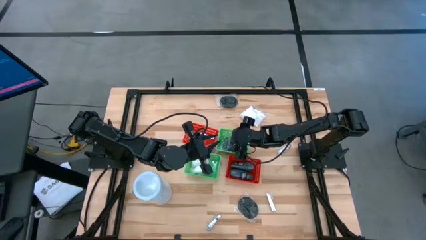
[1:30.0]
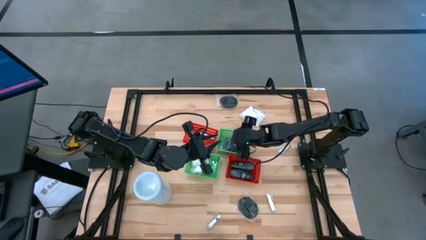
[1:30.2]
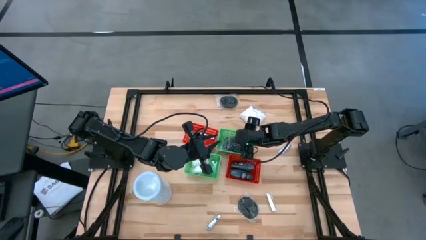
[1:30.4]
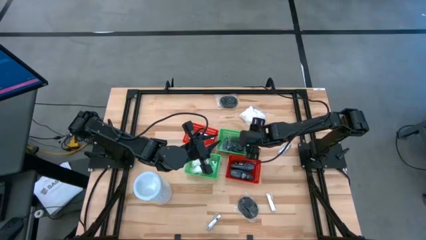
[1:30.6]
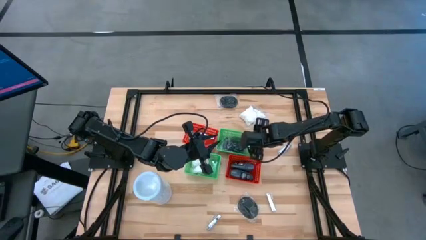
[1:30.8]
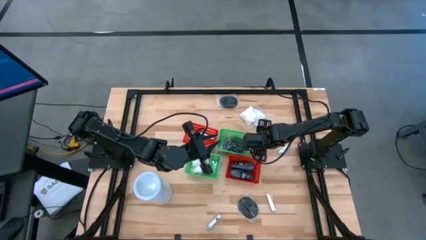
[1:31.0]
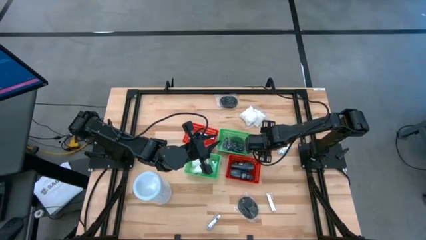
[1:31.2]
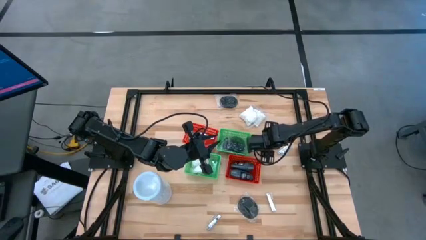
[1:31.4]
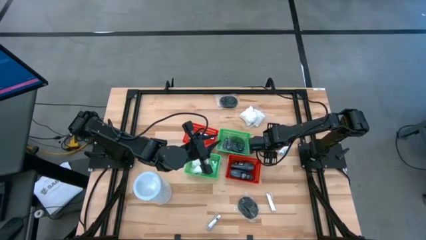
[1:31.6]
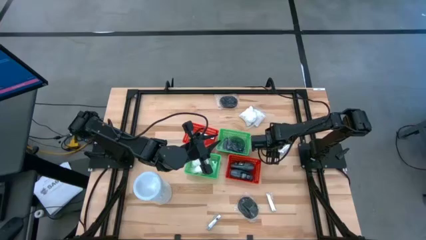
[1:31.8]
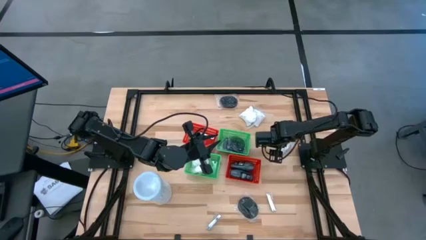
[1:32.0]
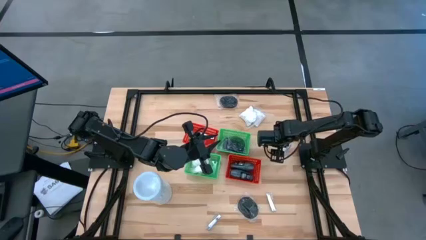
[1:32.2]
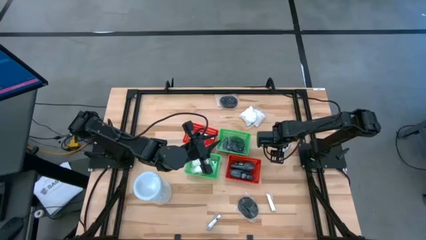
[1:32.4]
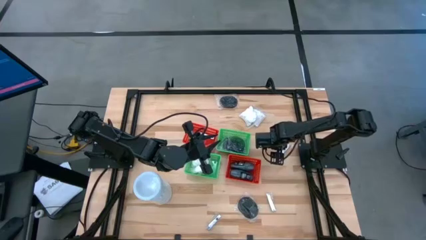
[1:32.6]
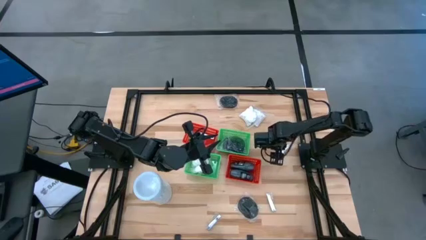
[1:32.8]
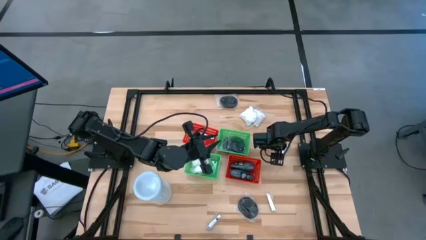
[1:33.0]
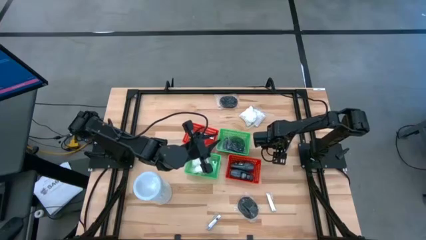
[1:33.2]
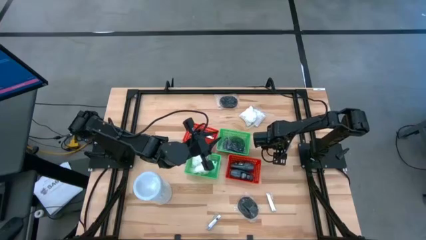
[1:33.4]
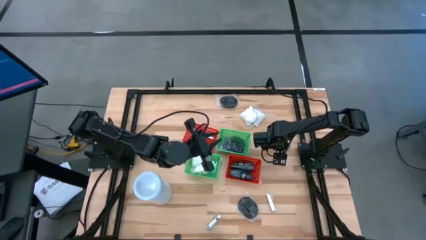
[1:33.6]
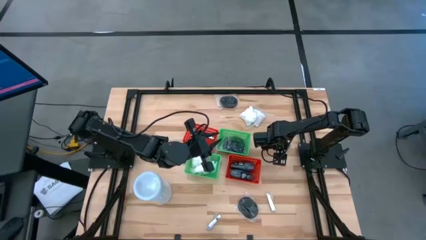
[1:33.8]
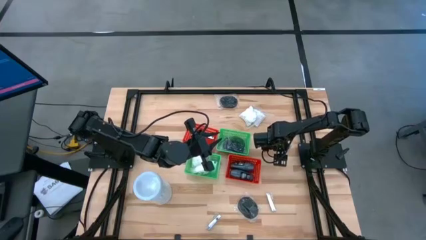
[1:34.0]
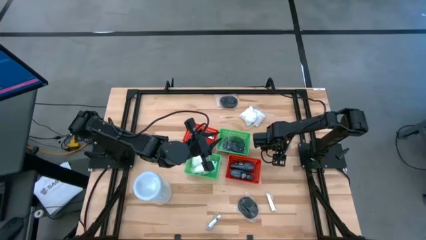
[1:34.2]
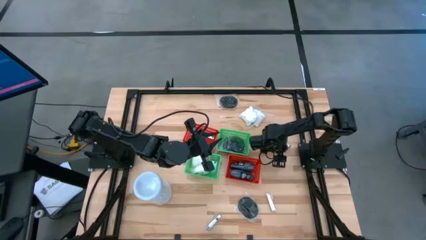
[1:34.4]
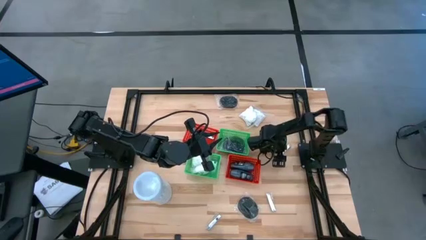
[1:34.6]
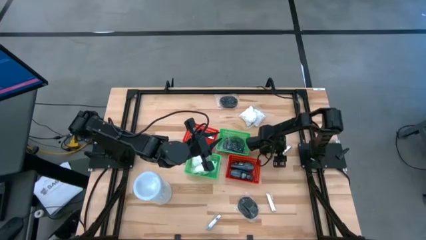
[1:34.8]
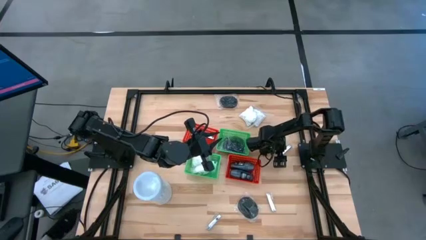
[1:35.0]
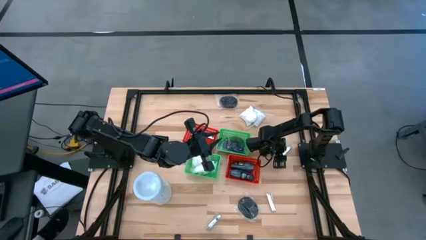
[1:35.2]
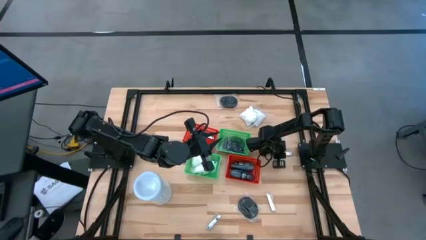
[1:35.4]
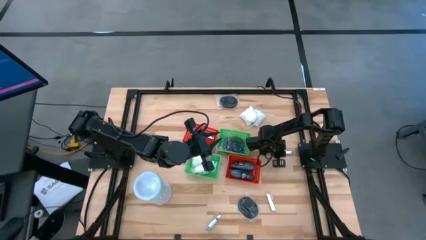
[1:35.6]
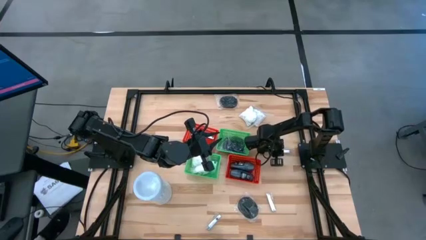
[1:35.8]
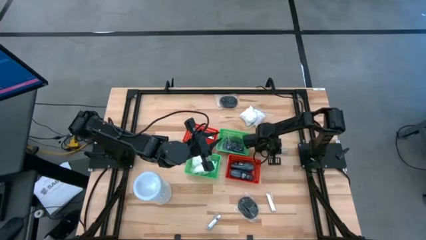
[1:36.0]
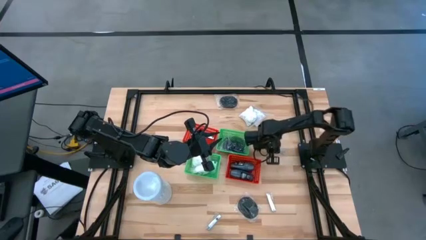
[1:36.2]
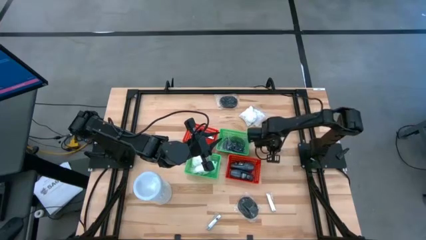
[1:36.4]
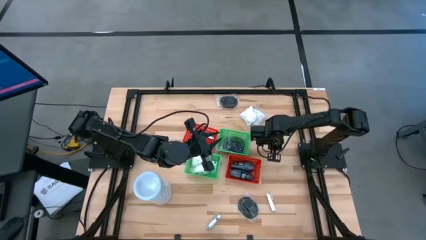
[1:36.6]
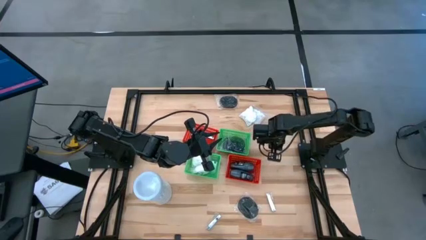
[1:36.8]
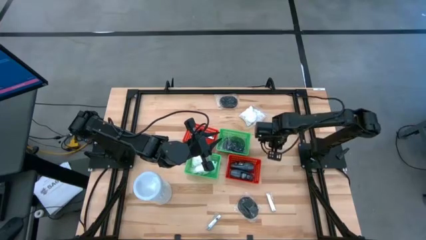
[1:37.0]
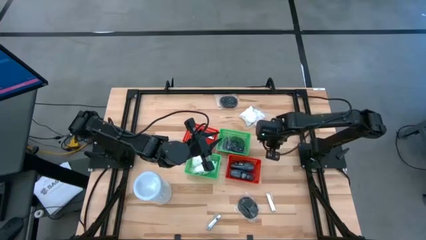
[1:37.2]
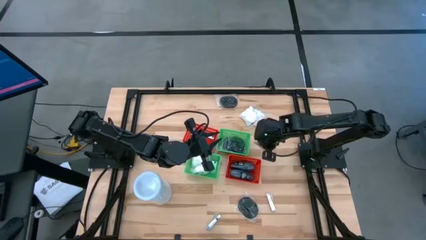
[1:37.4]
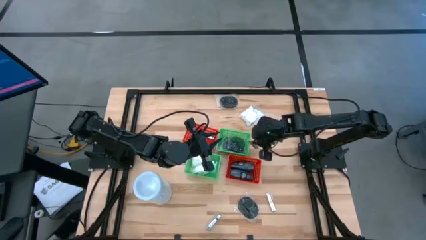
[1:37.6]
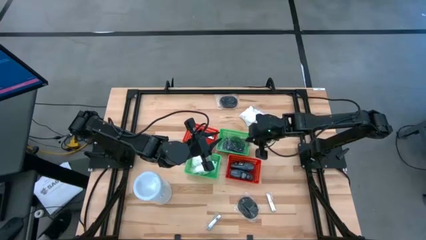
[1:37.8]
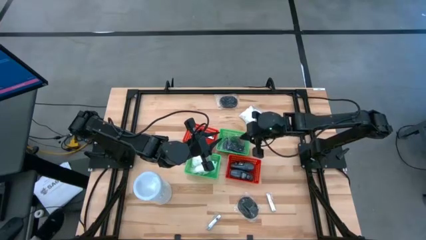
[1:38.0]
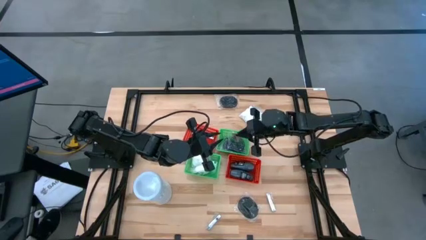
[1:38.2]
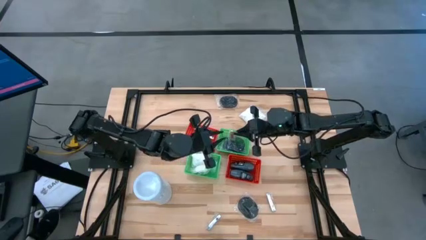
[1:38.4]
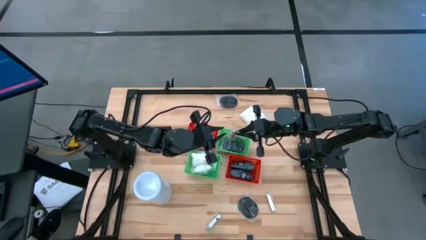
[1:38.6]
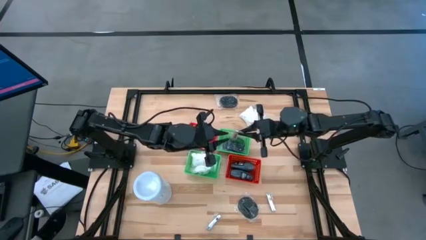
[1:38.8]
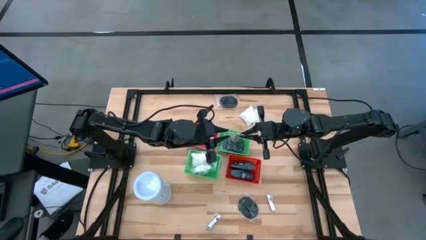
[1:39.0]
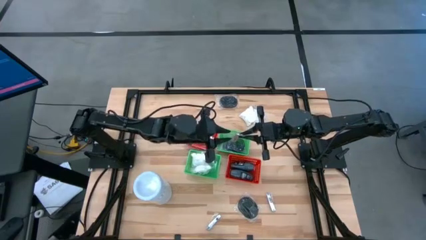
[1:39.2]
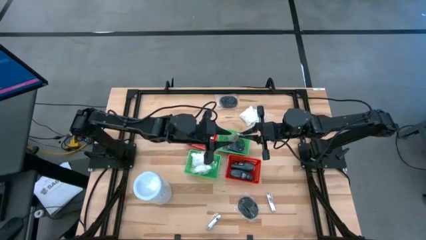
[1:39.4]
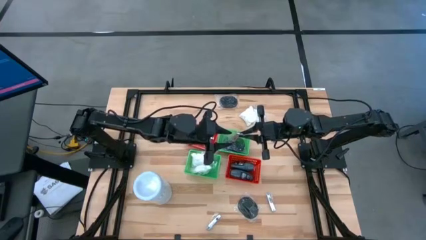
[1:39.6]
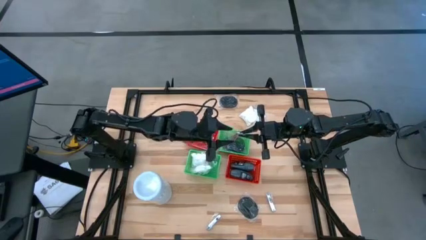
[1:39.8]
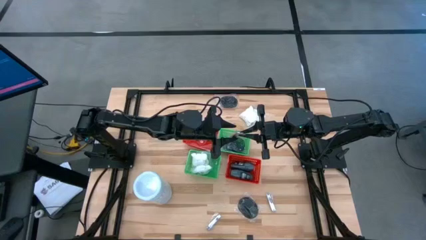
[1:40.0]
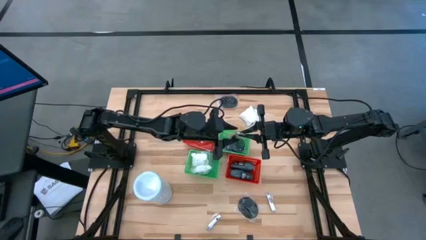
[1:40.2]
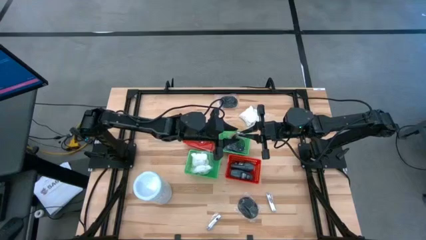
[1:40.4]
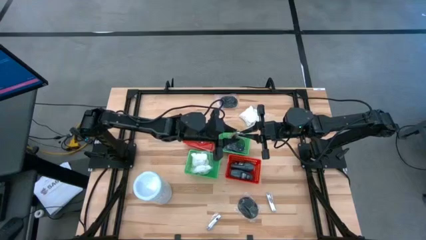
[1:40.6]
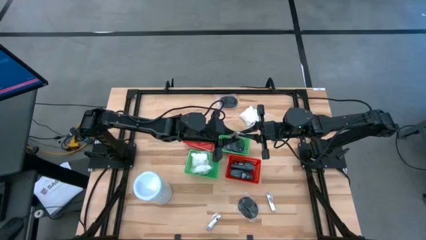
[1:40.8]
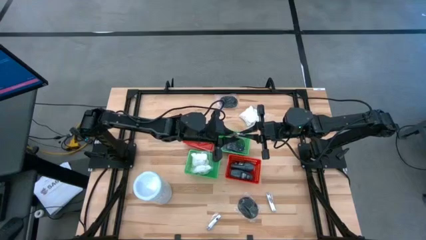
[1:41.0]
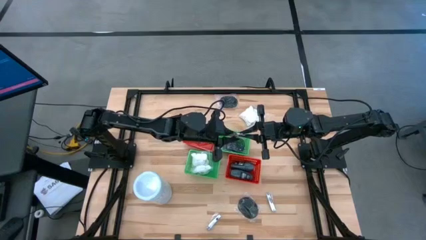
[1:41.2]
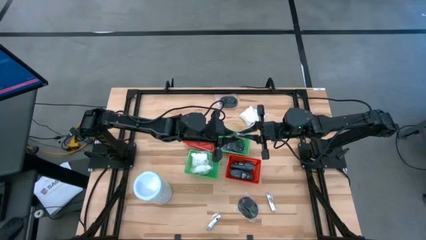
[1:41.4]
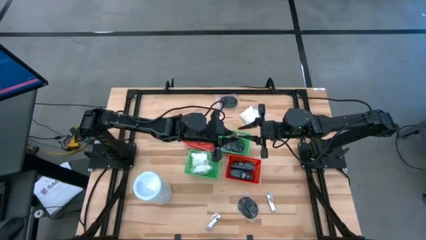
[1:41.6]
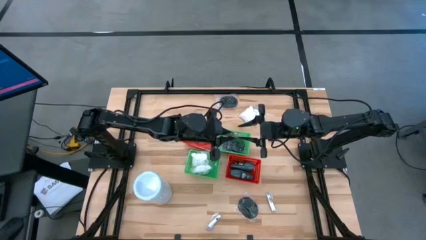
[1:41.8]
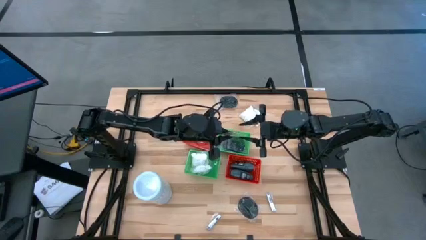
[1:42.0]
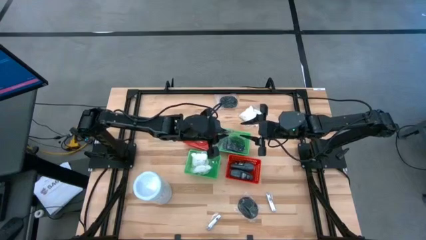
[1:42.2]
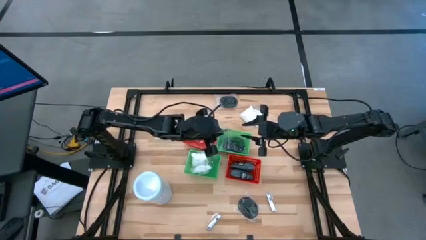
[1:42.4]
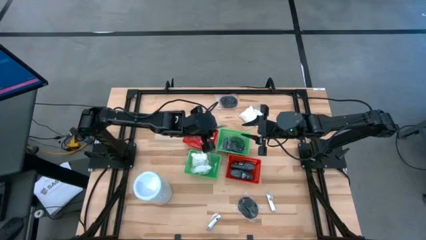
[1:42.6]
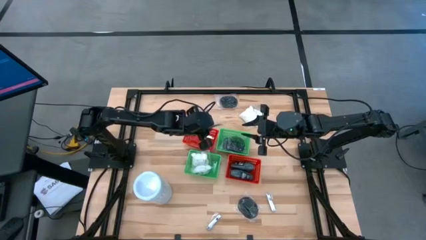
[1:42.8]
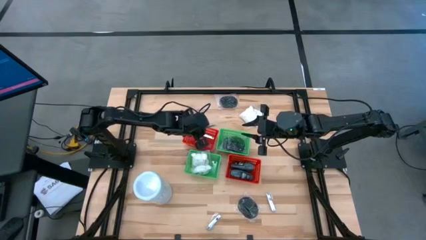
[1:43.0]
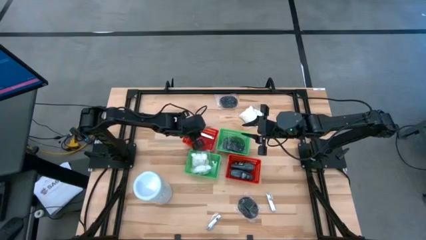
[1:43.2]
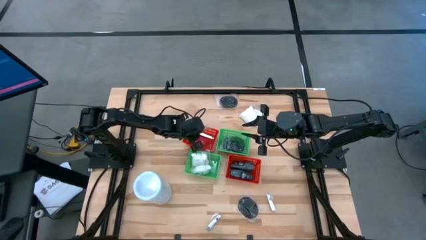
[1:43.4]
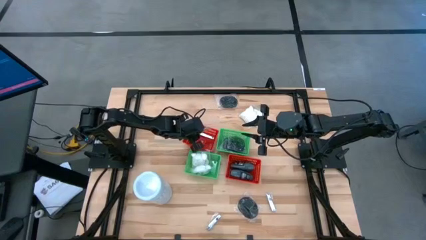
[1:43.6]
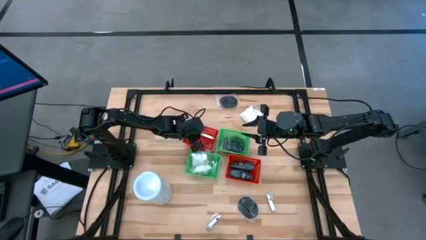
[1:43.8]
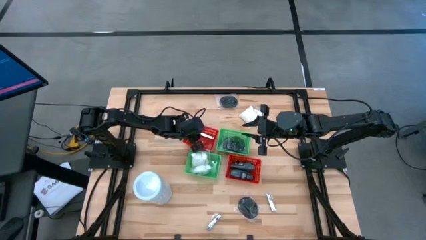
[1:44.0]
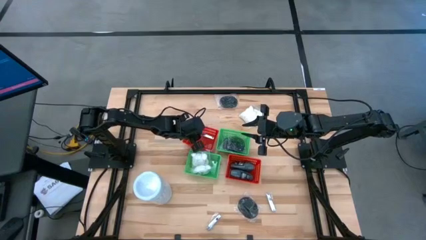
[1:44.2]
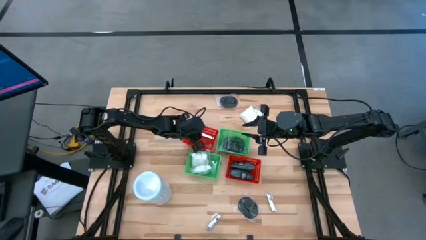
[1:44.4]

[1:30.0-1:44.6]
Task: Pick & Place Travel size toiletries
Put the silver nail cutter into the top left red bin

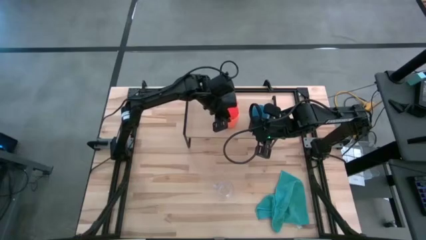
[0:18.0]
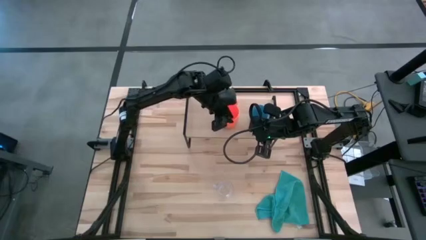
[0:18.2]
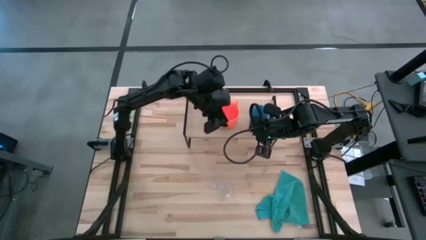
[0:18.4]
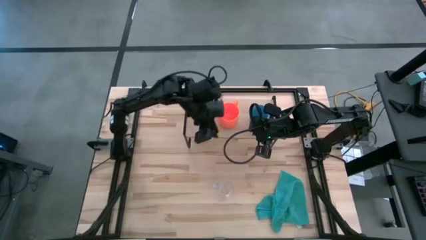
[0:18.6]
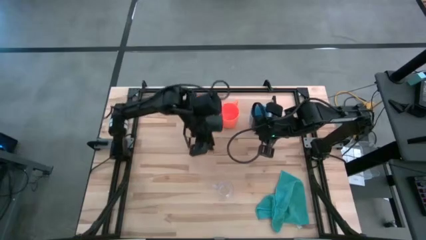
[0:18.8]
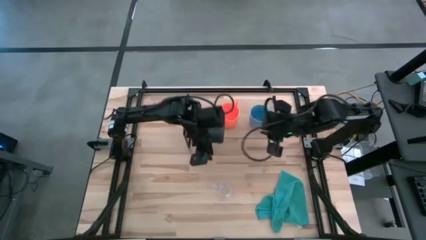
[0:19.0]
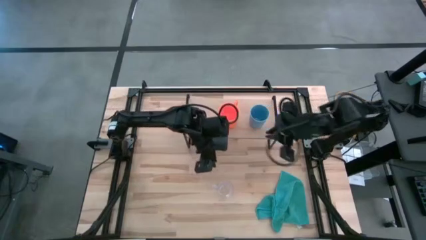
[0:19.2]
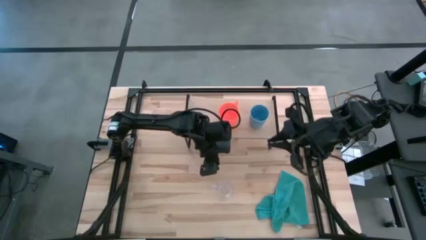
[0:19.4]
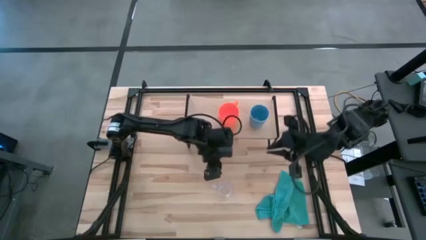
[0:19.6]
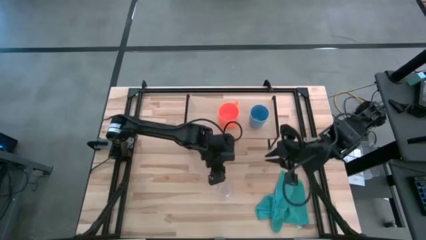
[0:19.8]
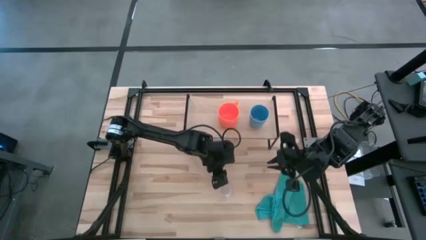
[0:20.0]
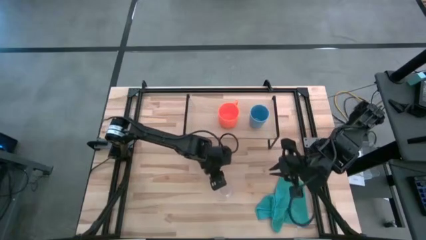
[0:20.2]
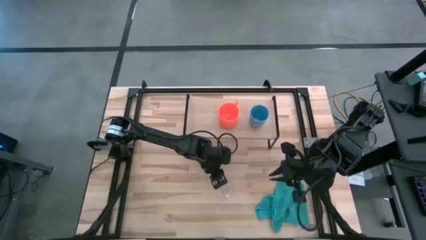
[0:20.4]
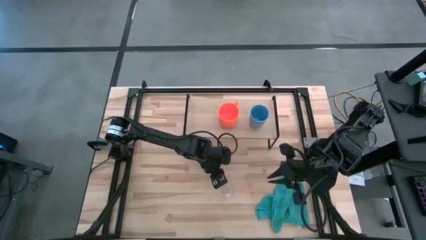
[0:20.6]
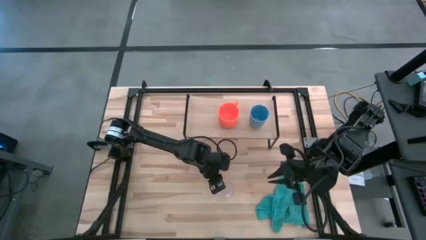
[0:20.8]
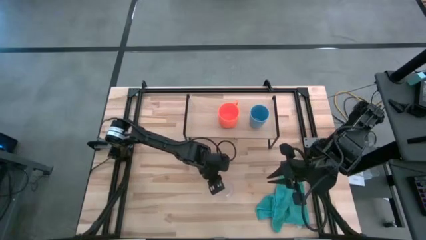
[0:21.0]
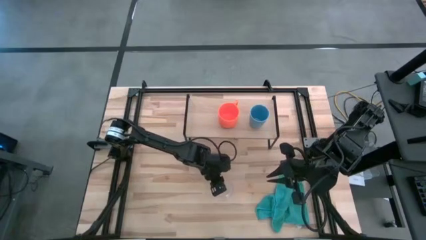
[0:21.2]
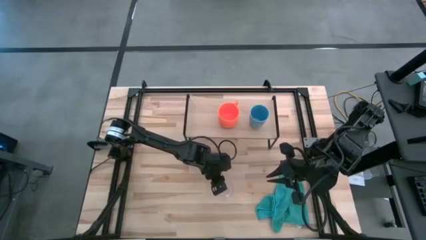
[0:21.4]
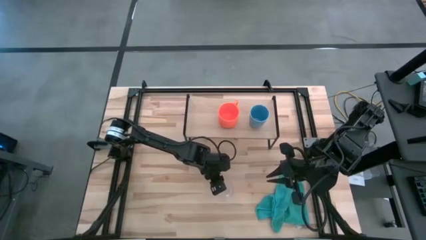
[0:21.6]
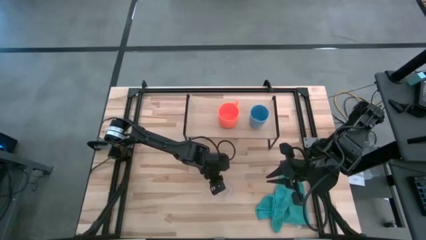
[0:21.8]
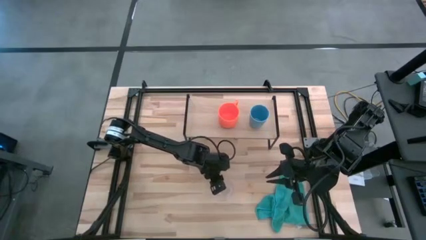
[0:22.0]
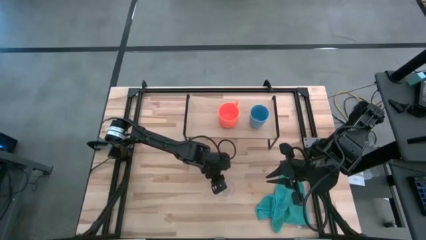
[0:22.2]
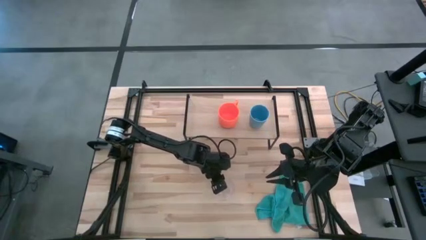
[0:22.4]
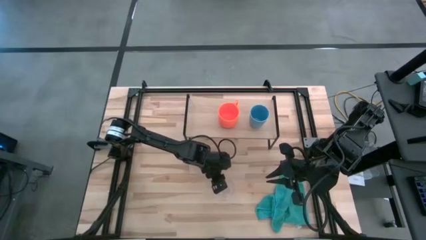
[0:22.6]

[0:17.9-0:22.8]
Task: Stack small to large cups/mugs on shelf
Put the transparent mug on the shelf
